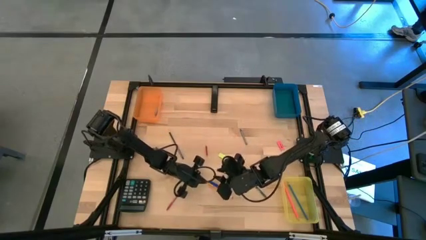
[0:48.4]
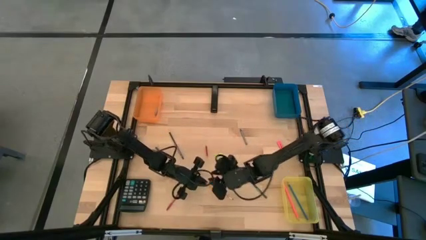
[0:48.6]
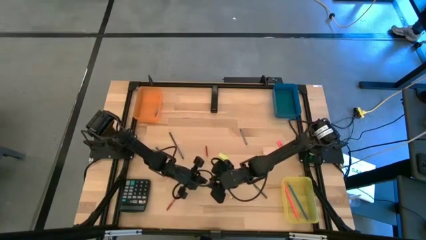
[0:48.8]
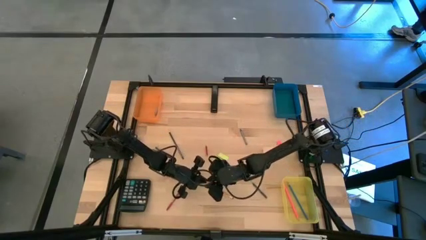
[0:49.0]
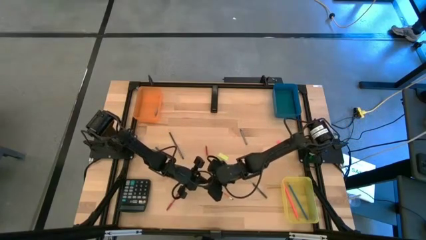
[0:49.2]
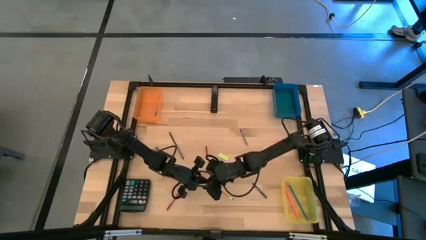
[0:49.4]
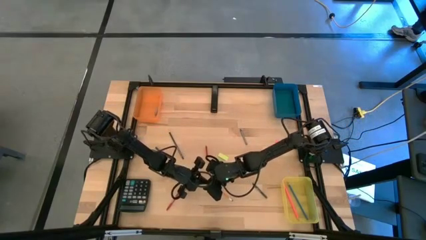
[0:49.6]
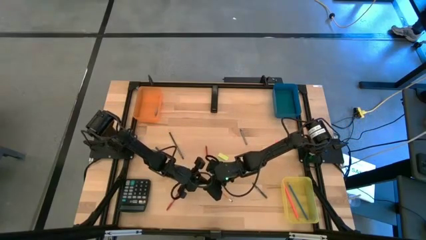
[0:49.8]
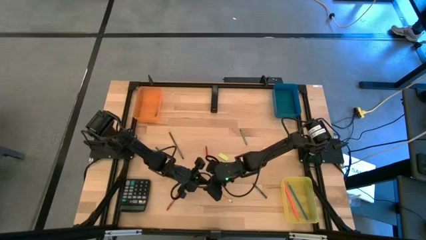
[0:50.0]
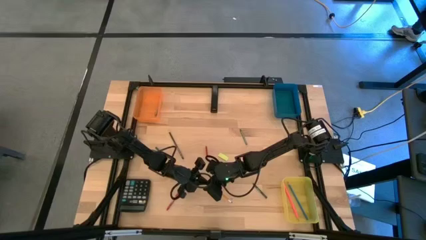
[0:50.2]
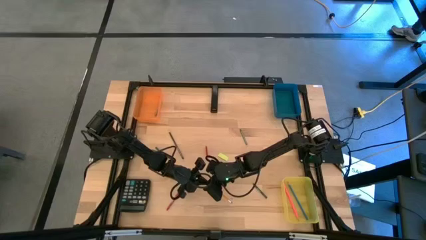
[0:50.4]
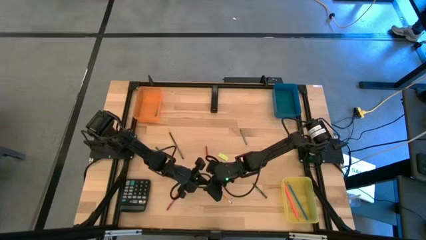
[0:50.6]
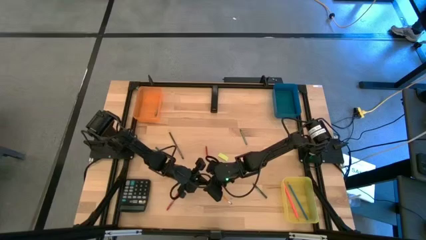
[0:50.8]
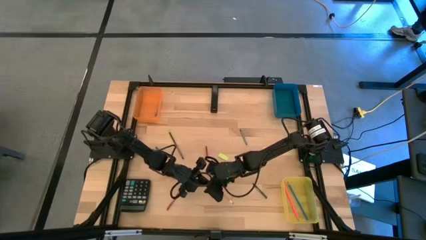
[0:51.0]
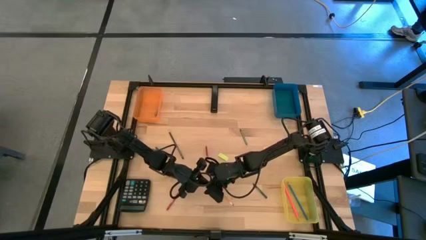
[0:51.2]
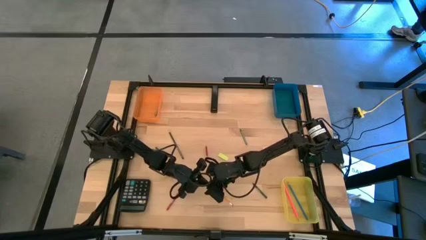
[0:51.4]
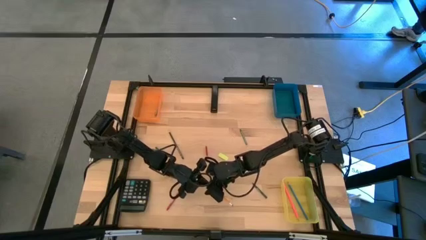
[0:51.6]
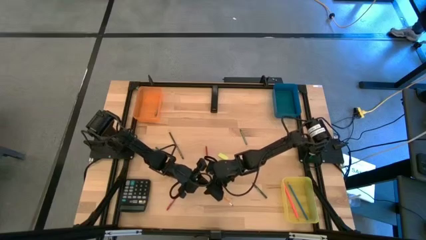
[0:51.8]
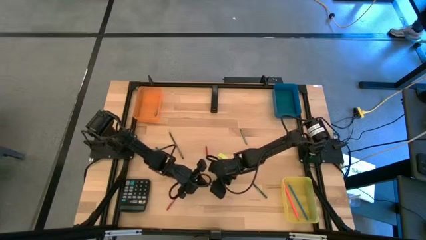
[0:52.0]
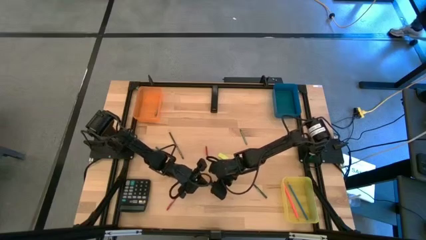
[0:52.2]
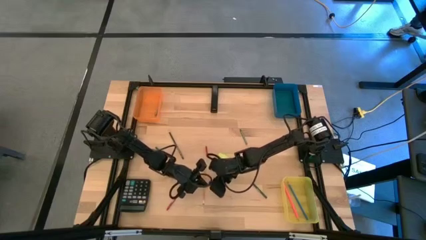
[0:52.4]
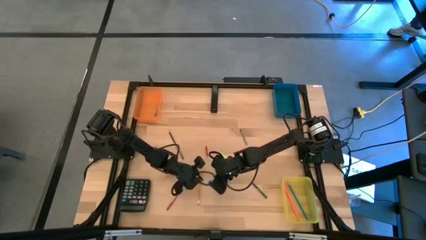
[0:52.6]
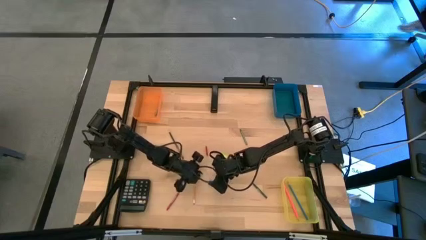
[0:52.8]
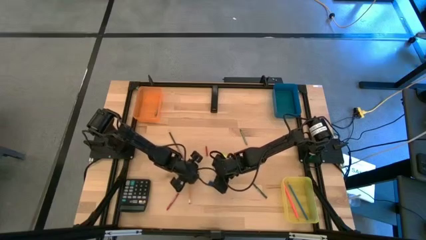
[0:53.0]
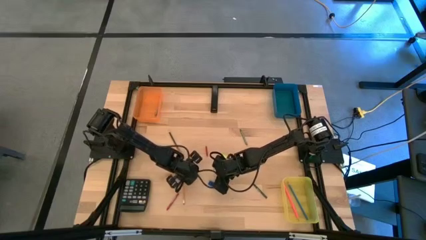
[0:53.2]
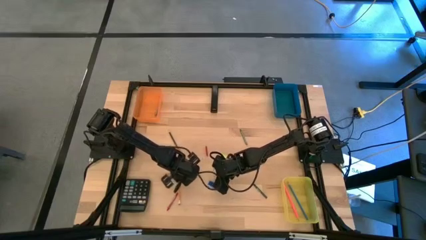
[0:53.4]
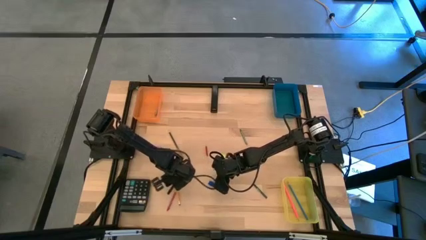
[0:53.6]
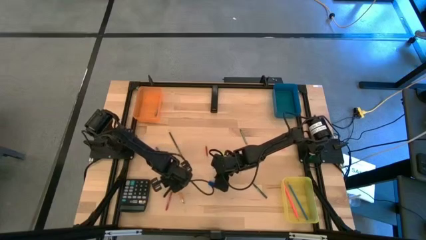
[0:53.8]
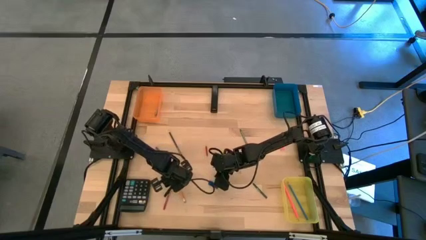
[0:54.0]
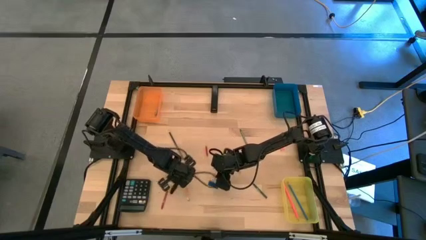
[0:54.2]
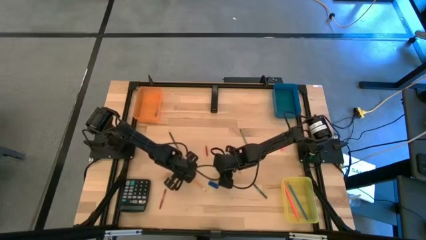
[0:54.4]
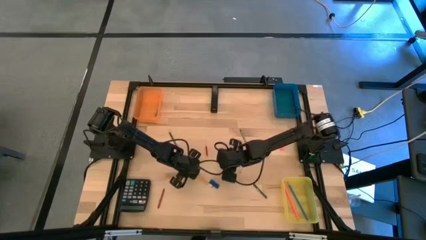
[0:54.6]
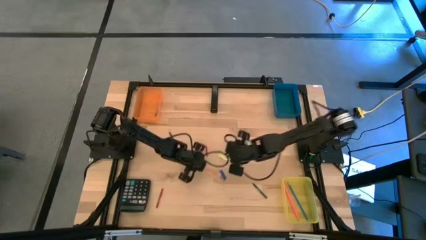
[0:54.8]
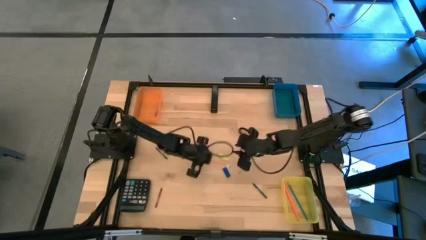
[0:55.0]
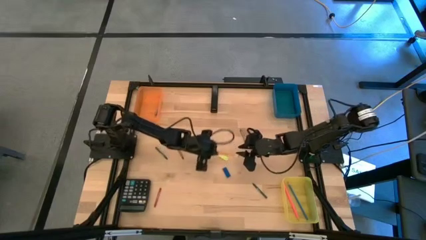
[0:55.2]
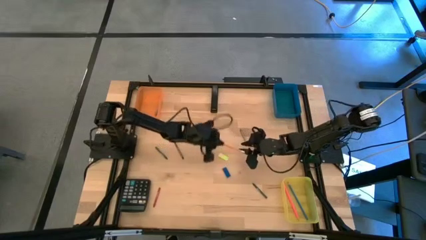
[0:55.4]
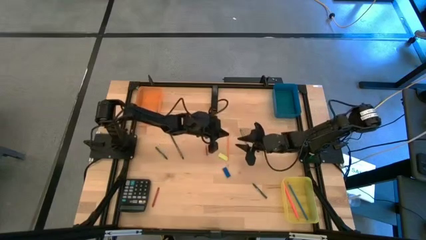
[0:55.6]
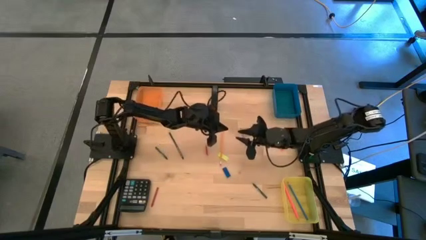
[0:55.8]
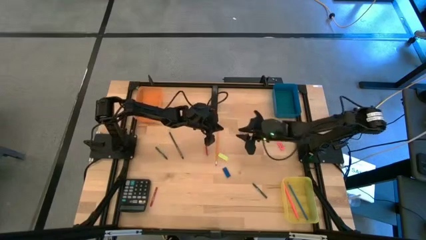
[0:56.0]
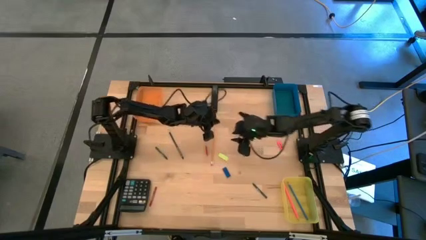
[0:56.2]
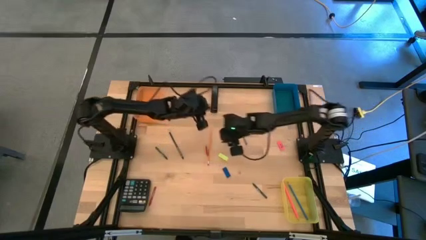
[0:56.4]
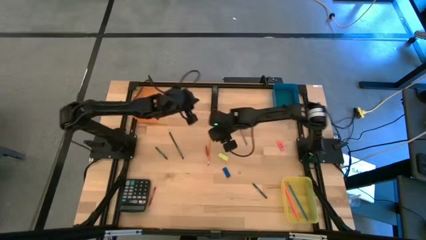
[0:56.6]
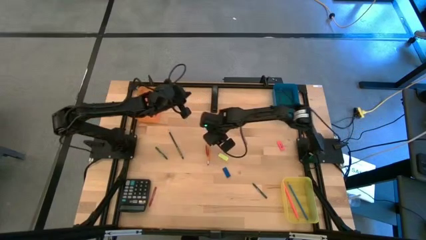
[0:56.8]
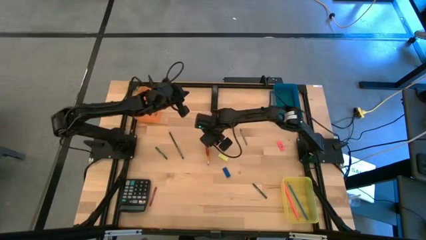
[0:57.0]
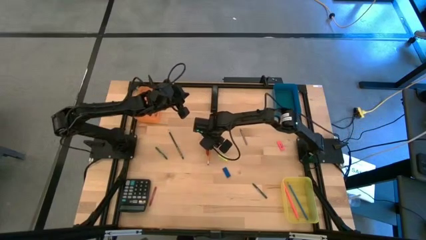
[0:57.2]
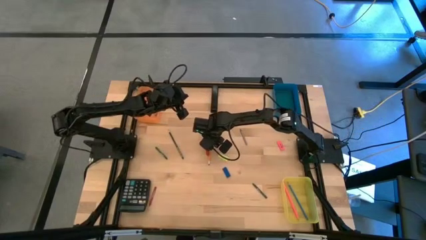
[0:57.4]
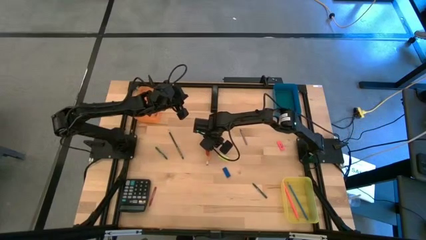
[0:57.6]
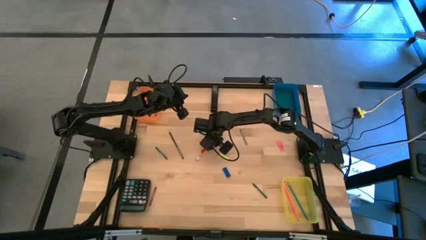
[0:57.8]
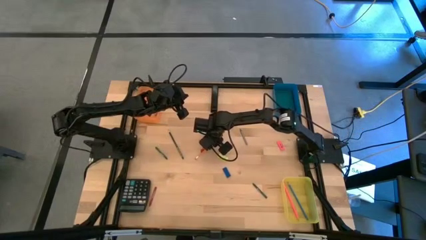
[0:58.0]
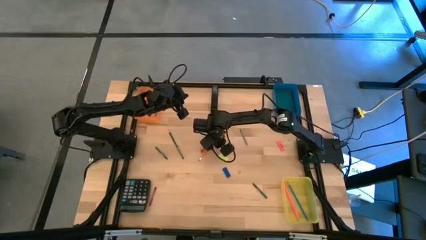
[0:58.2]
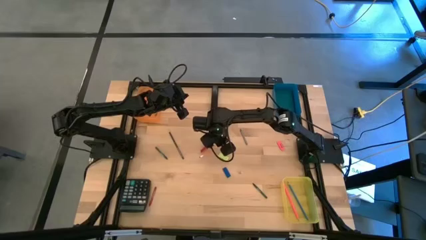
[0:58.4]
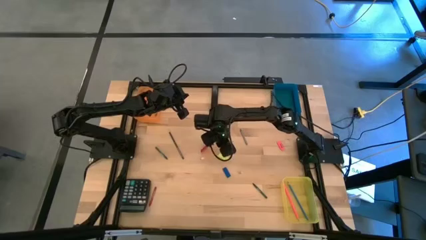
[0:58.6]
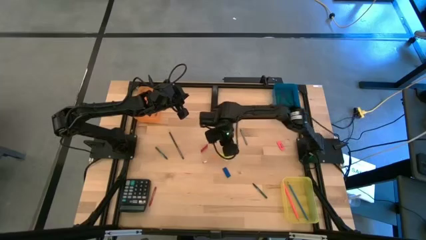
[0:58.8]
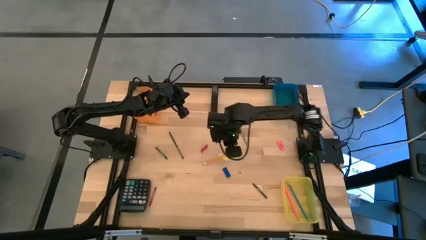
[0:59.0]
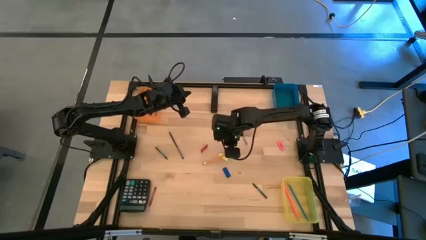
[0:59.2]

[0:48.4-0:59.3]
Task: Sort crayons/erasers/pens/pencils in bins
Put the yellow pencil into the yellow bin

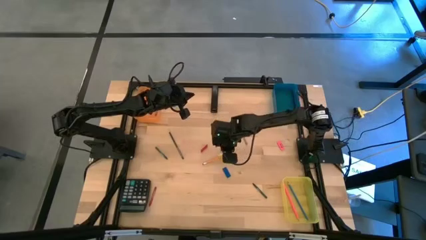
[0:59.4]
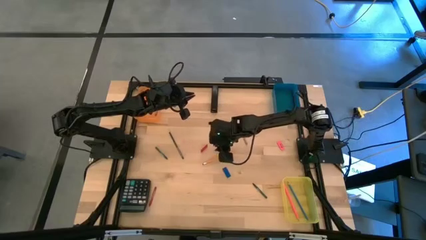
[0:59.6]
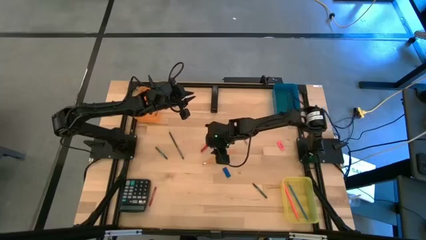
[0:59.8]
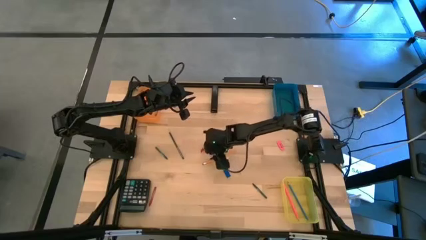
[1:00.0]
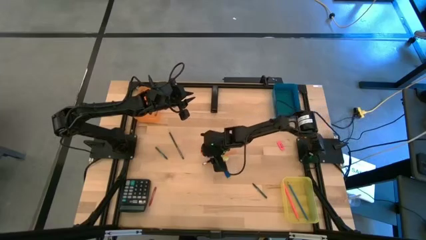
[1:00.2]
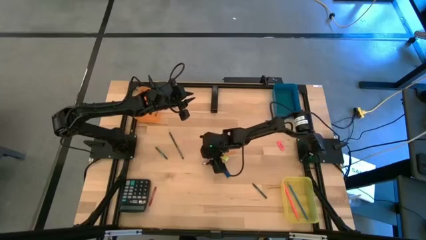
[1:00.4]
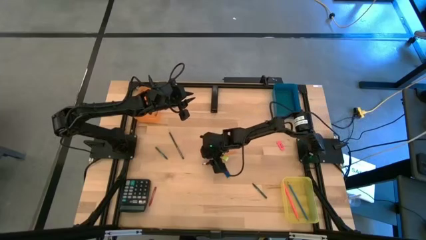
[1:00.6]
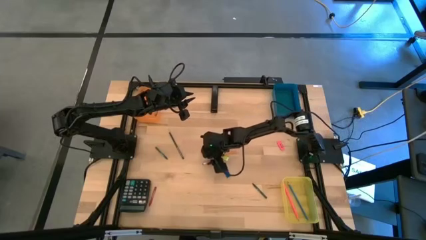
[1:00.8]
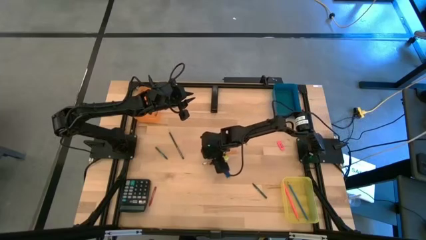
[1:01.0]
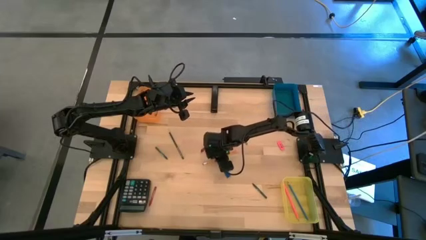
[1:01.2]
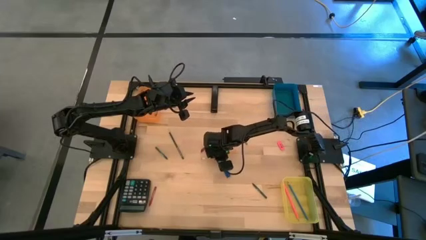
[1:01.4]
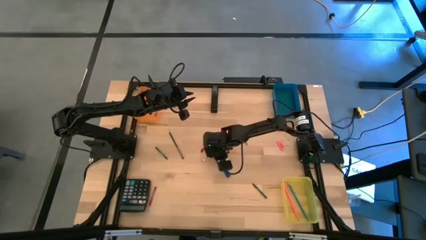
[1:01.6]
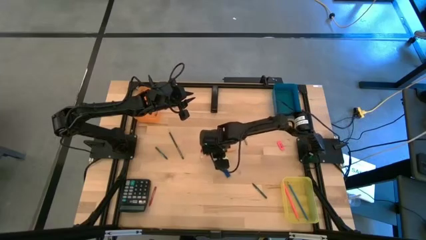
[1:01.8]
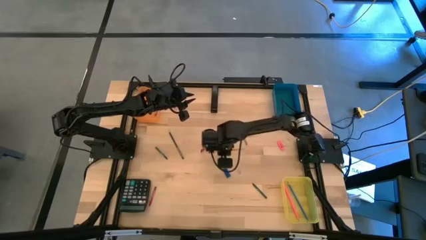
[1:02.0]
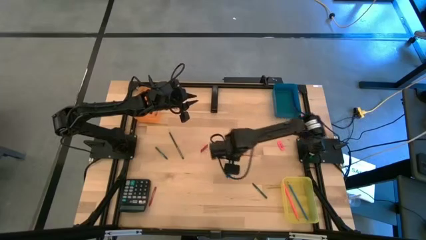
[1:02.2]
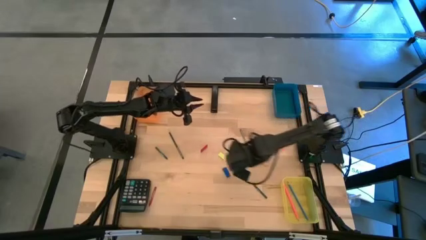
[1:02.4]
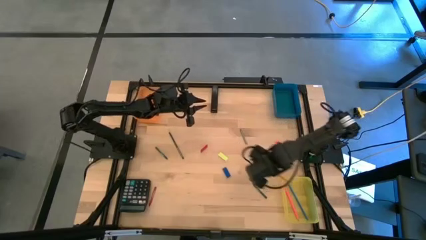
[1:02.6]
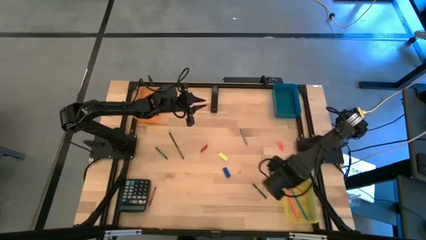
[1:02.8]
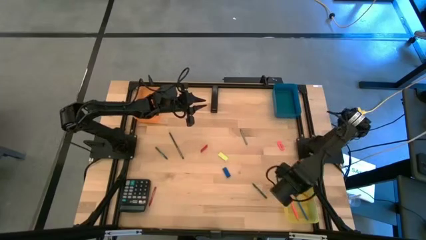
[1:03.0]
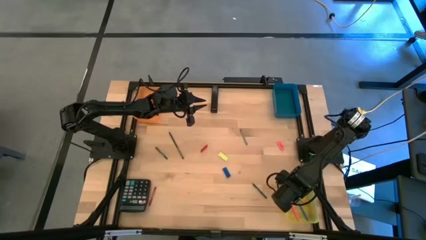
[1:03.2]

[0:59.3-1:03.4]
Put the yellow pencil into the yellow bin

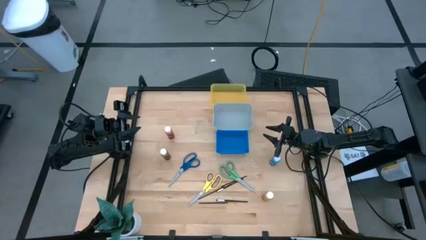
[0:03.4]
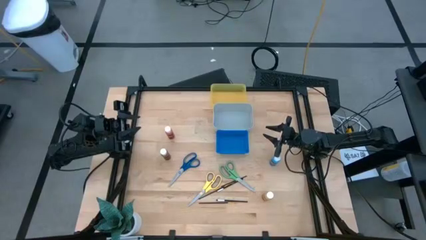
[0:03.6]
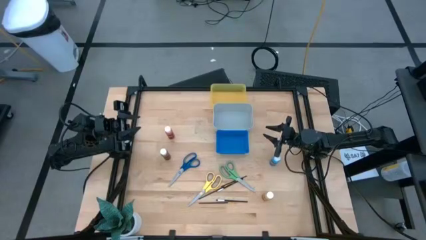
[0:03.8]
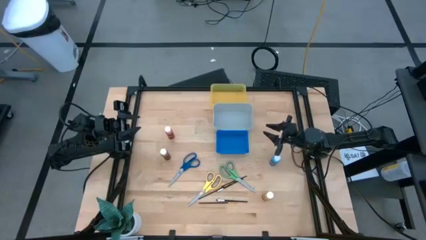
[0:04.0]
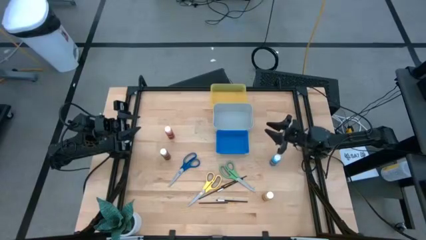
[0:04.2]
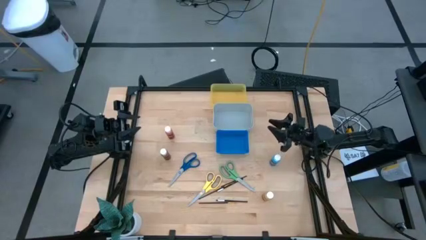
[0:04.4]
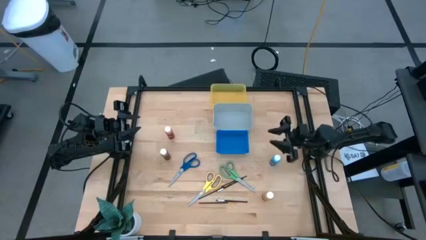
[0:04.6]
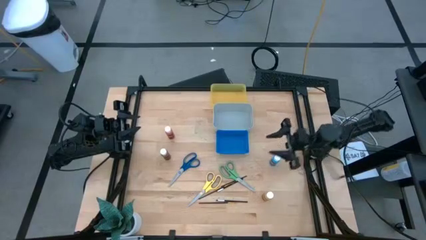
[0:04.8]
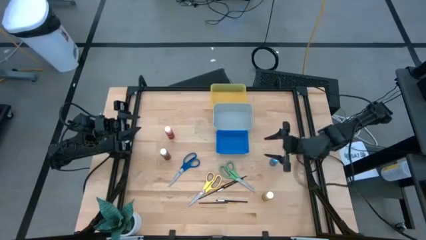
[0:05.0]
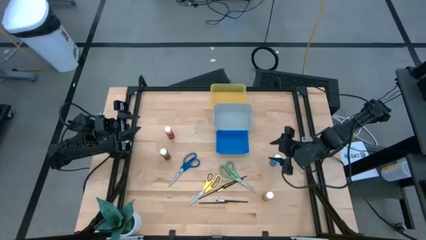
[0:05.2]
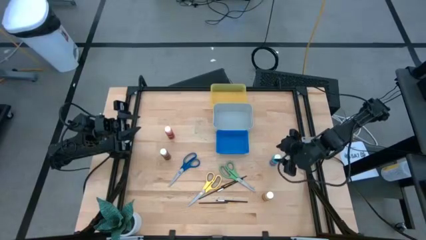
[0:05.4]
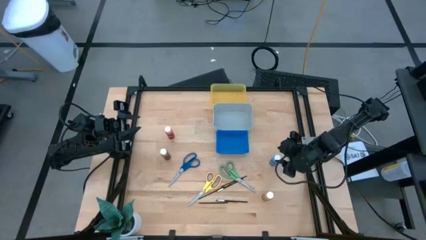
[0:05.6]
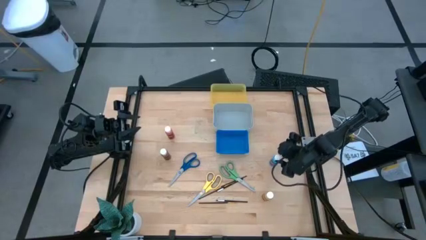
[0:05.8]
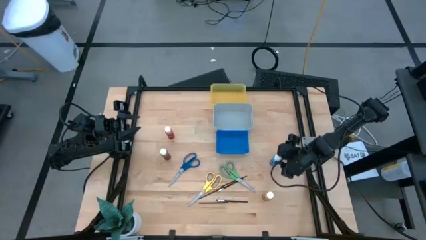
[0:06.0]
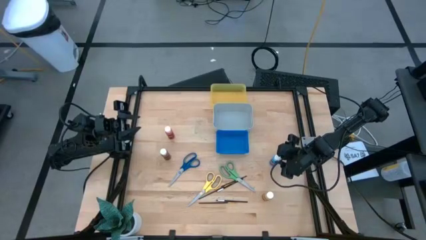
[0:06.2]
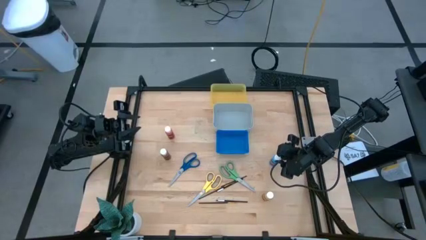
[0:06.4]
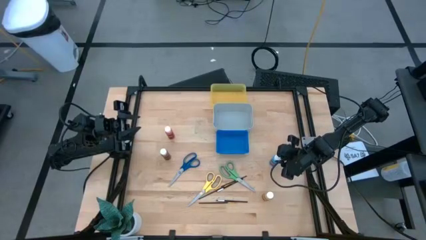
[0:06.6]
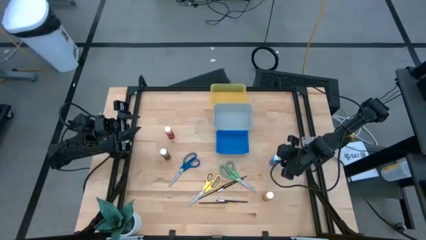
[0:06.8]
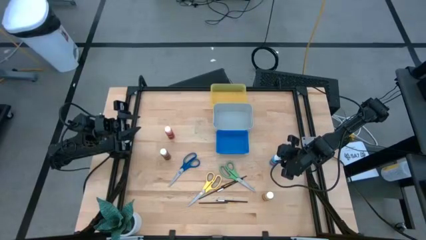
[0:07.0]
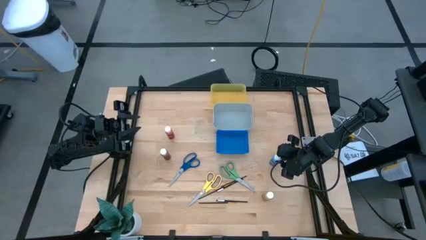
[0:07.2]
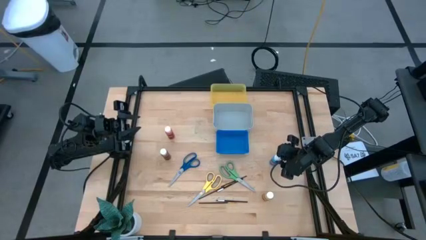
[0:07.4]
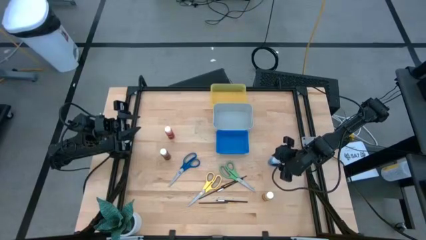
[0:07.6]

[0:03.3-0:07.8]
Task: Pick & Place Paint Supplies
Put the blue paint bottle into the yellow bin
